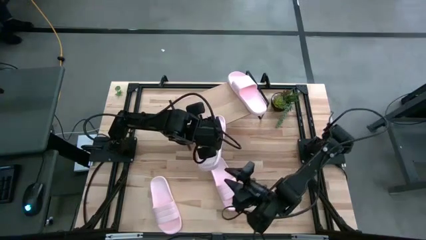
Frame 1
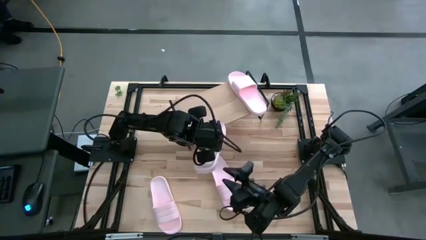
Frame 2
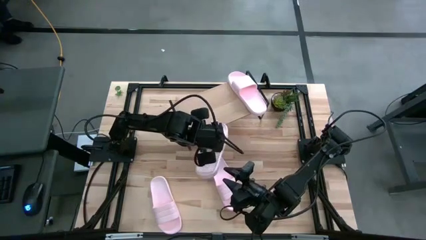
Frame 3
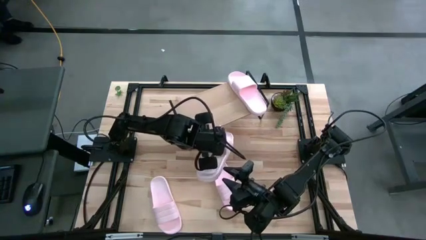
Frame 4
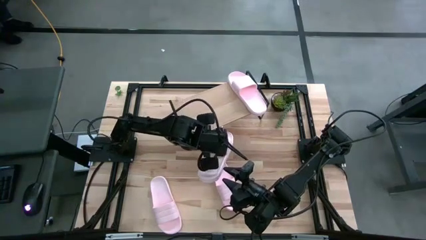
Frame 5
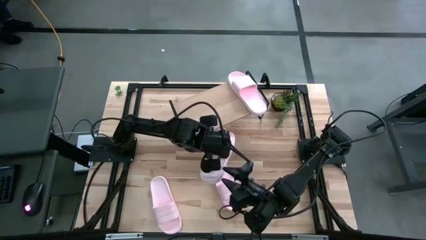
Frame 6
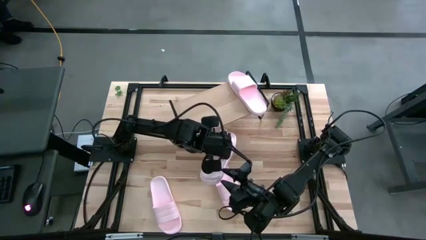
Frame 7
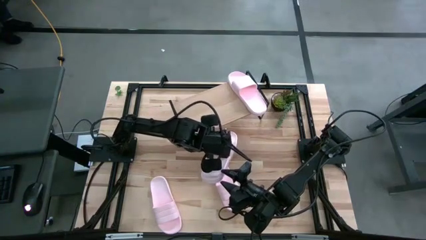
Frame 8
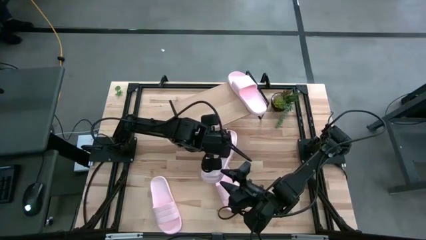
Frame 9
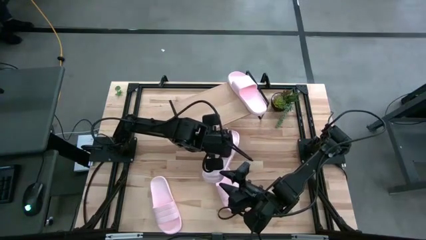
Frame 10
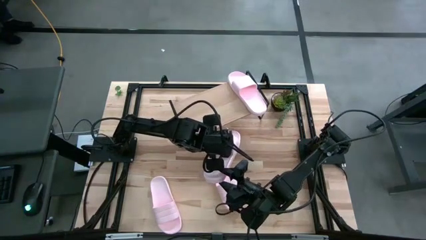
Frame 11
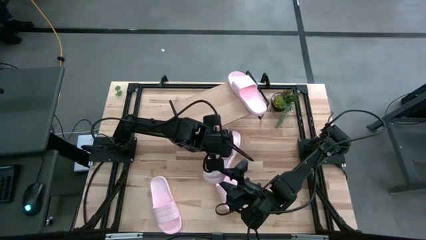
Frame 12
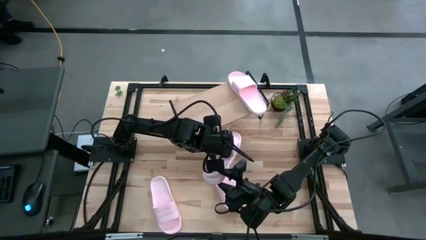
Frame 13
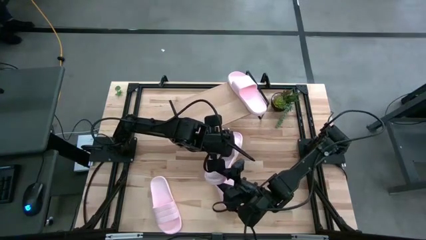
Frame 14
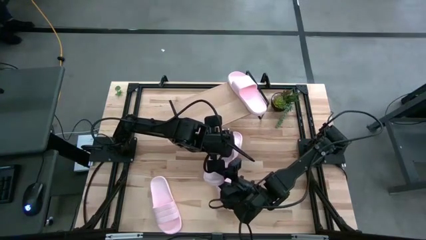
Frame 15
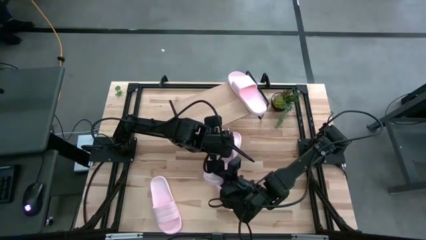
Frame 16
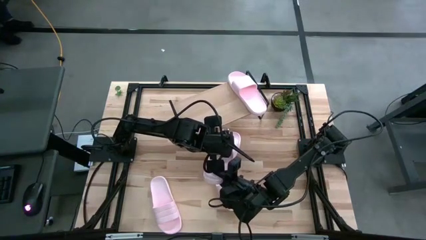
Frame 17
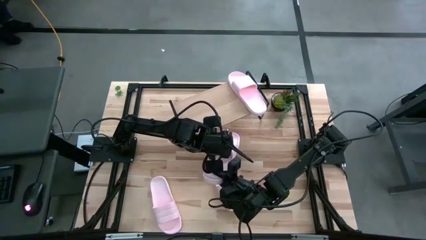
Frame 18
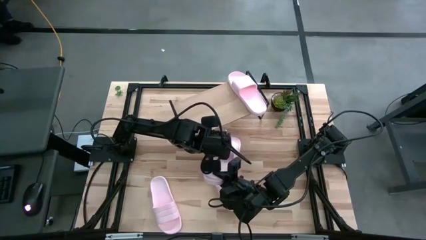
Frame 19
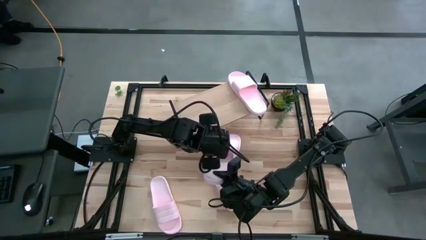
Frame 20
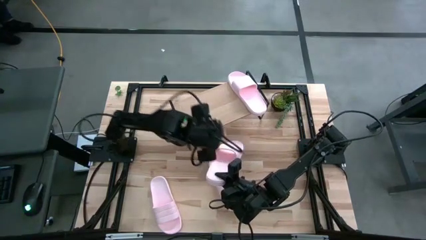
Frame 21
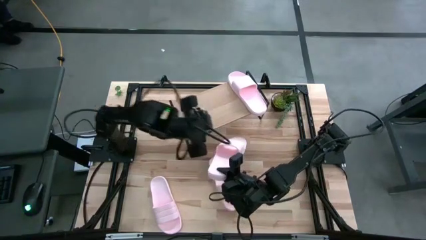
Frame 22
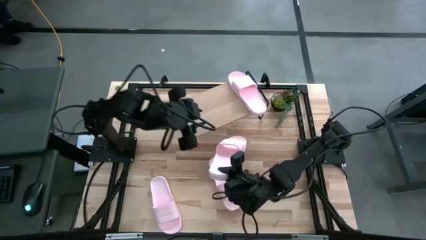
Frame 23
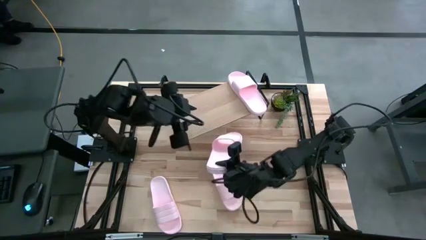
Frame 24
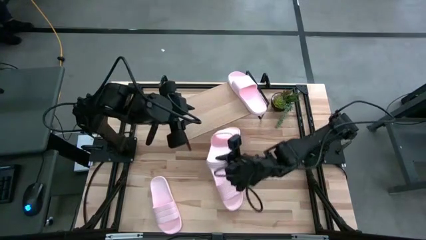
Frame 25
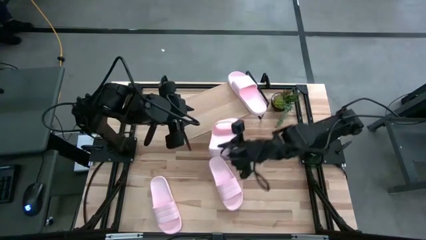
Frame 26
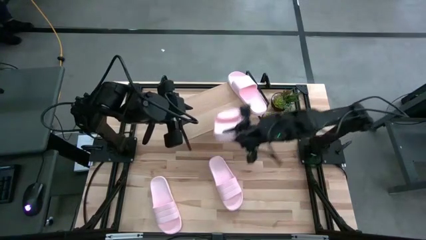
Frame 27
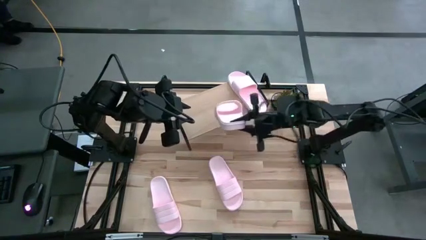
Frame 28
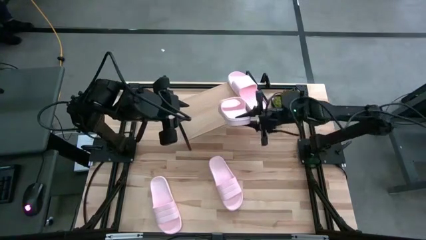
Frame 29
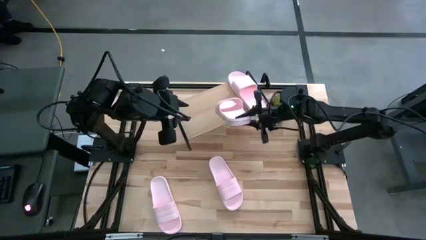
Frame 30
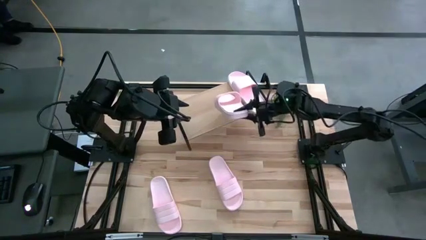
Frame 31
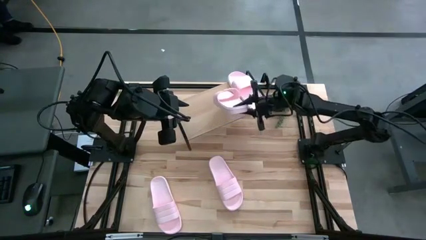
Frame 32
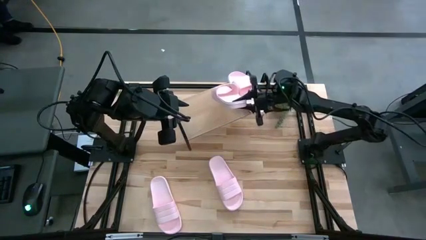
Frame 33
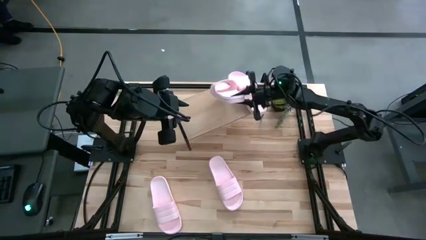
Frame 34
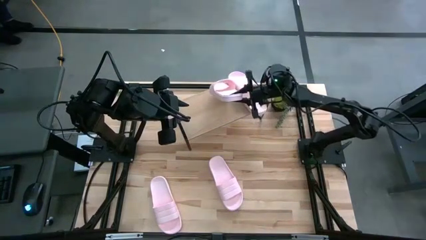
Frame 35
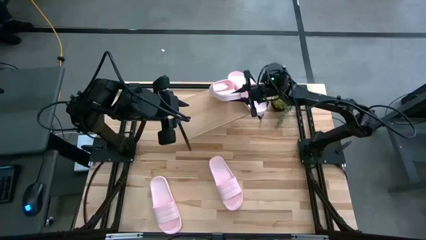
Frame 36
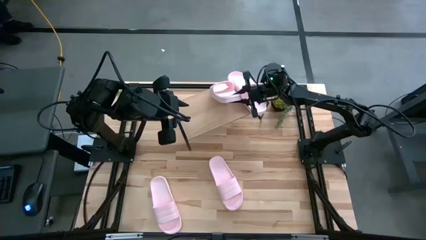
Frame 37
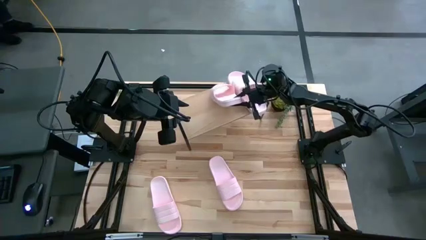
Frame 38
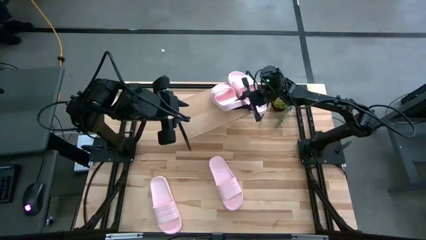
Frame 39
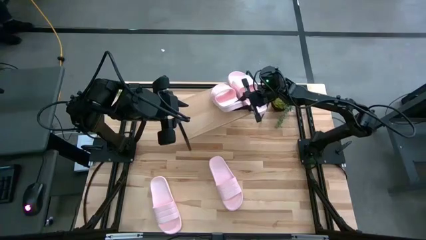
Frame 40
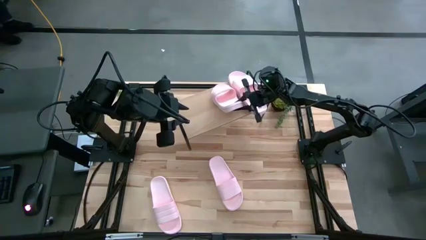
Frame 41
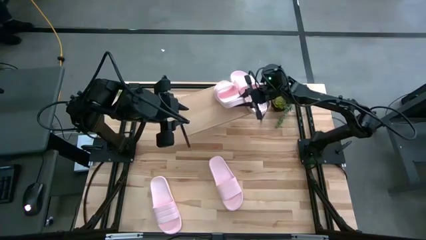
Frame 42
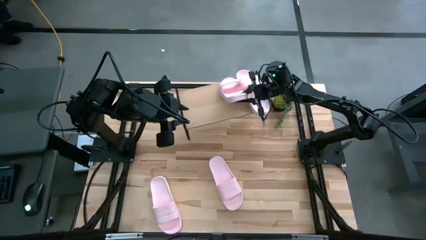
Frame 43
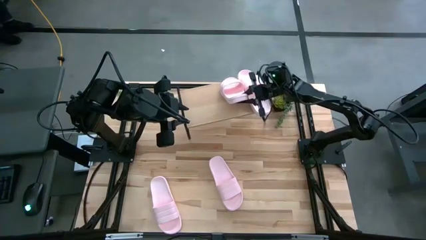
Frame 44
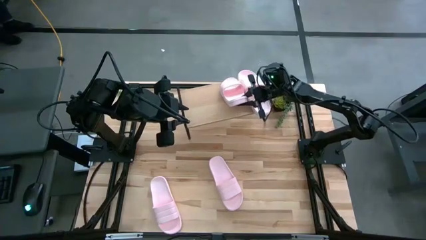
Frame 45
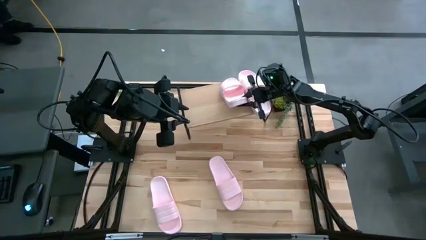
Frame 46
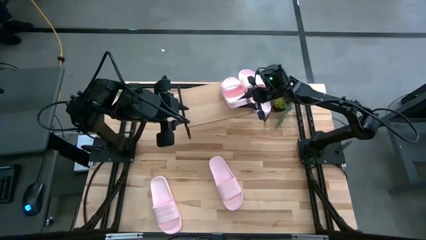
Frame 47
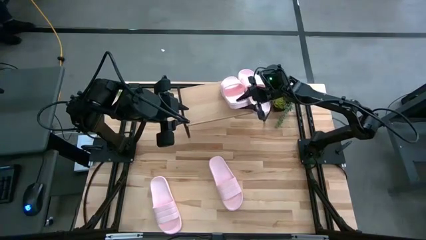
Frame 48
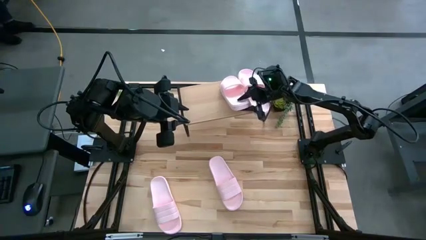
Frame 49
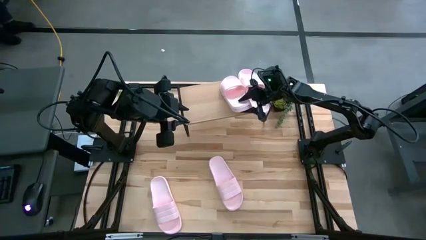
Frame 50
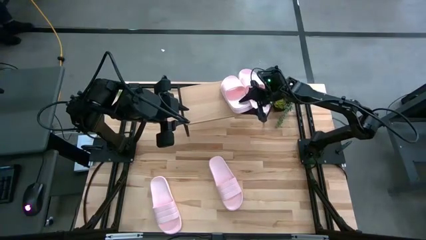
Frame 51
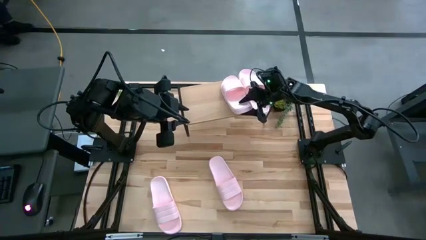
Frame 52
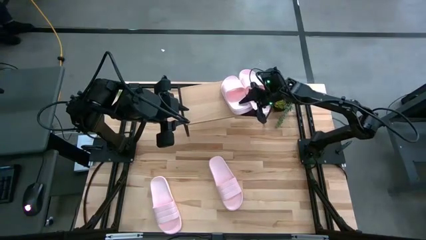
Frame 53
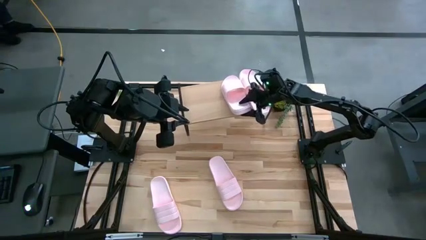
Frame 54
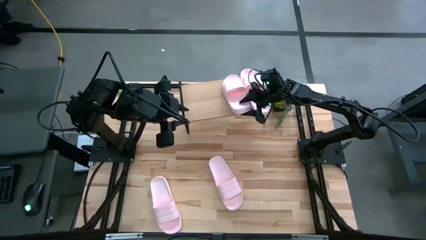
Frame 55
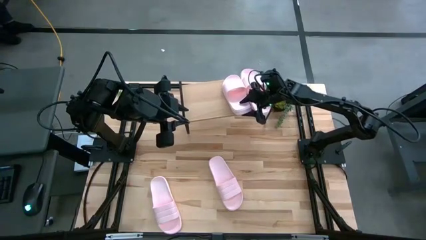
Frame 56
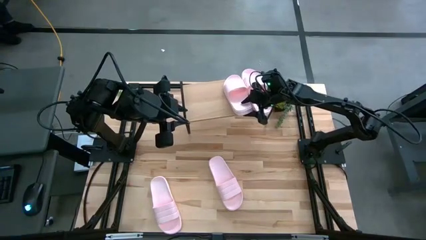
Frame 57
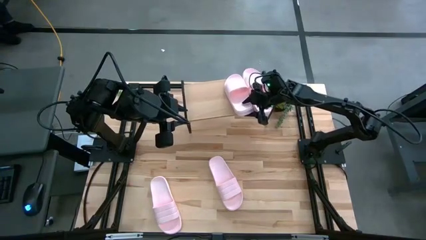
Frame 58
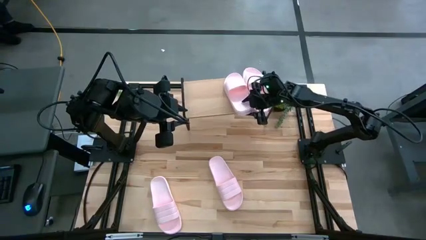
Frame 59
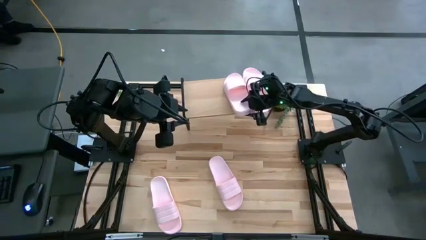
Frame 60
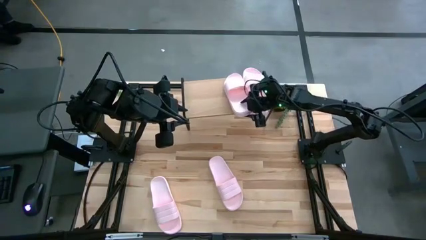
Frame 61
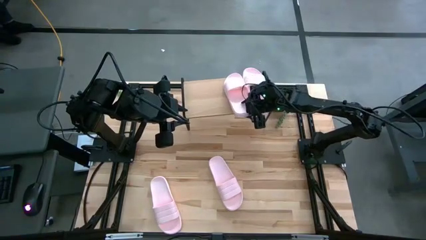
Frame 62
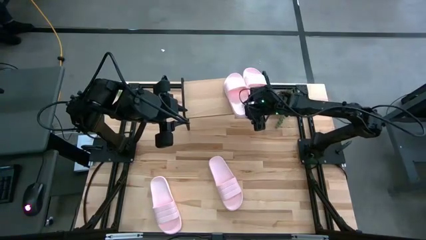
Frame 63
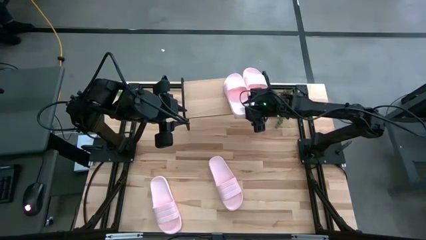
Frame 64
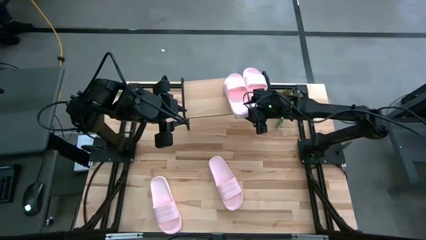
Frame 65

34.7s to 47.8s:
Task: Pick and place slides into the shelf
Put the pink slipper on the shelf
